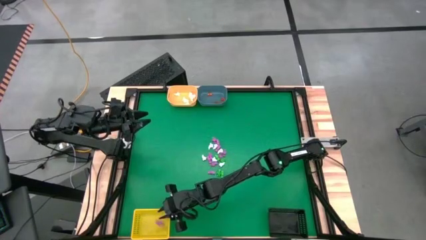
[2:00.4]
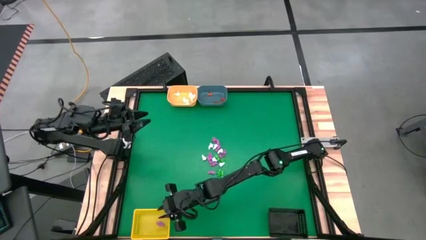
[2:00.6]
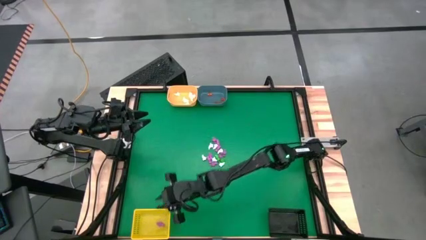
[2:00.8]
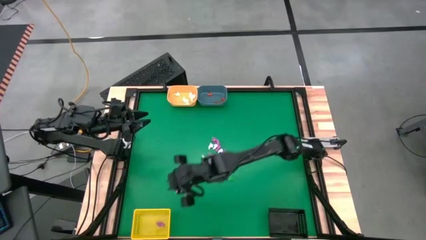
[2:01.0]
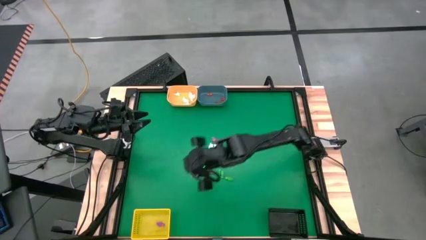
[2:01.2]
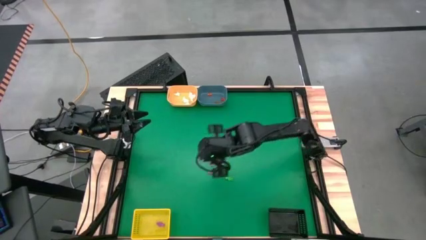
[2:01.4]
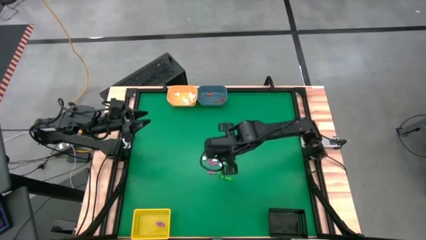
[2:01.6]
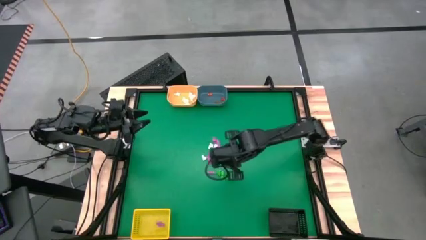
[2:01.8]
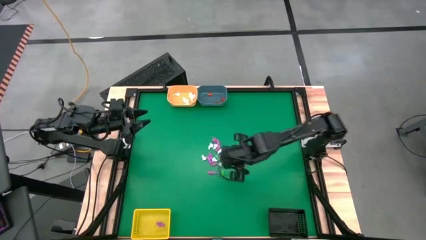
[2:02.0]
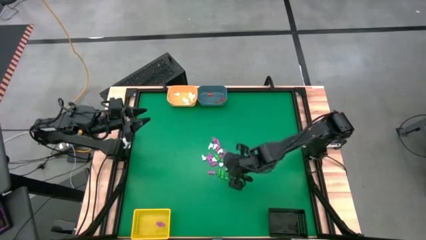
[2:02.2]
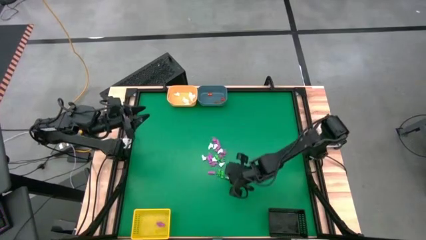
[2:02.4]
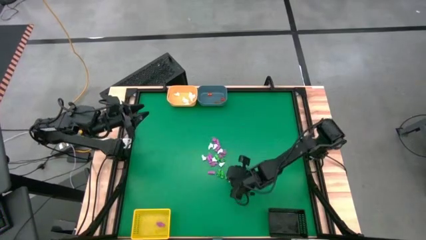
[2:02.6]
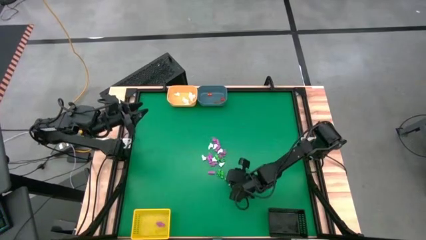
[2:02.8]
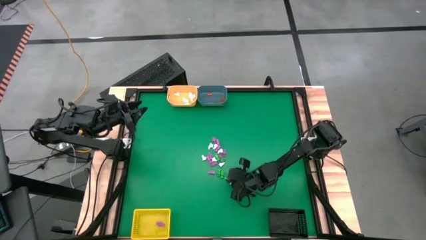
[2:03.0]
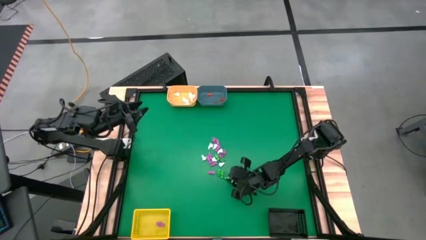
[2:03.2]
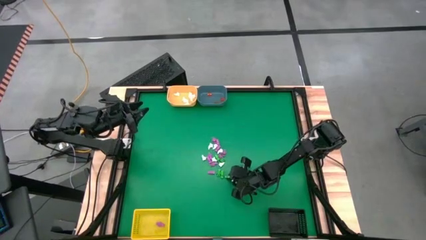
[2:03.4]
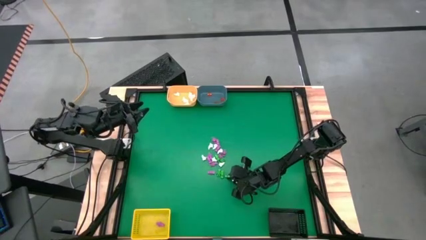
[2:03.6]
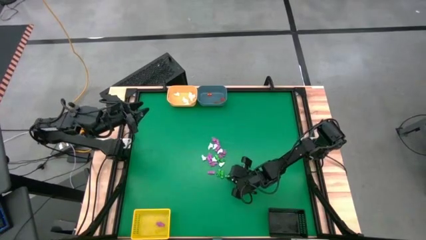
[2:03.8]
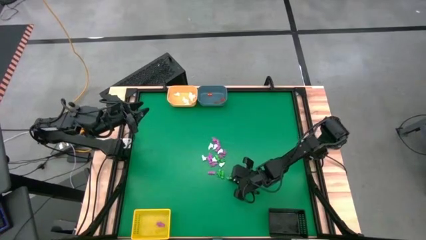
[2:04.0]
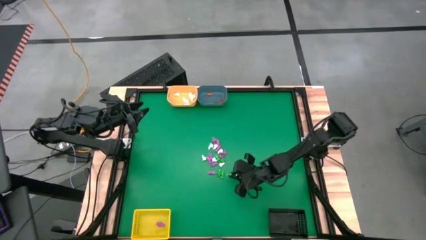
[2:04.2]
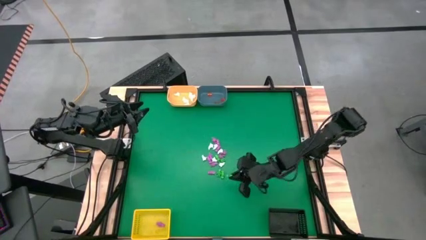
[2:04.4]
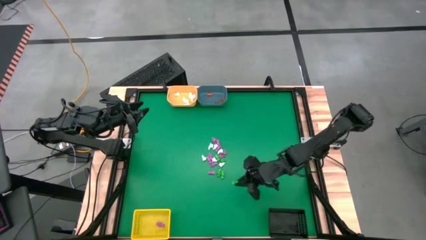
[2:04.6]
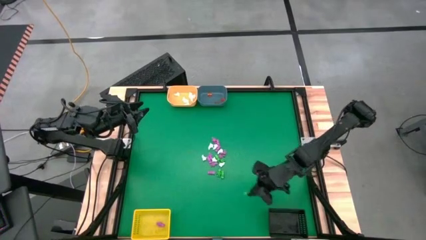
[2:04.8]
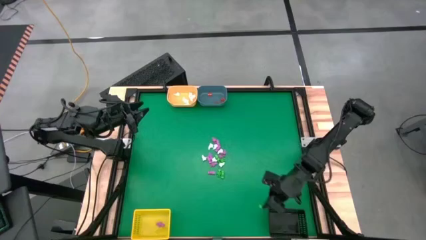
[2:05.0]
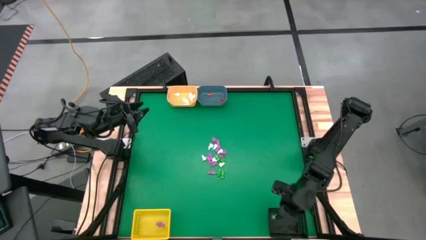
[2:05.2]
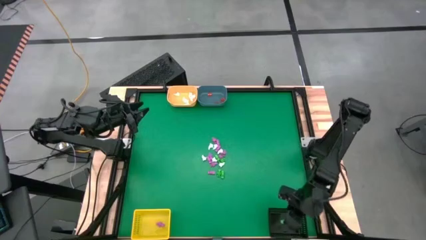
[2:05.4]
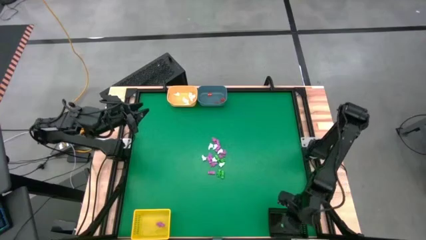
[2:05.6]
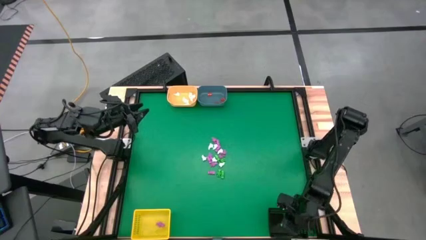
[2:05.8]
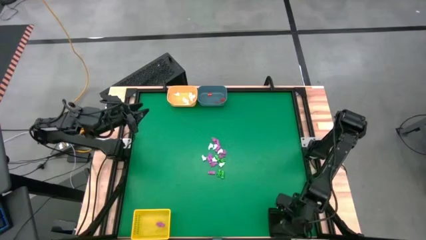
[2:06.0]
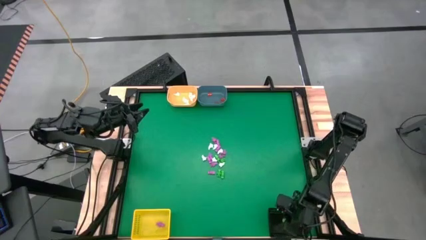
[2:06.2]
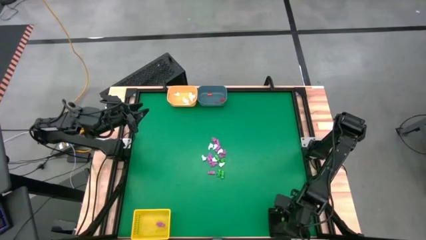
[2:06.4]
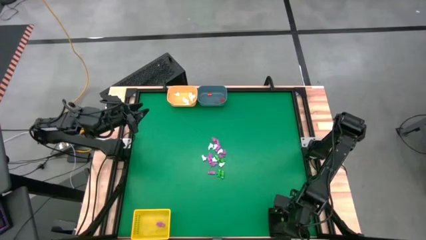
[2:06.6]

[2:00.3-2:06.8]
Task: Sort Halloween decoration
Put the green skeleton into the black bin

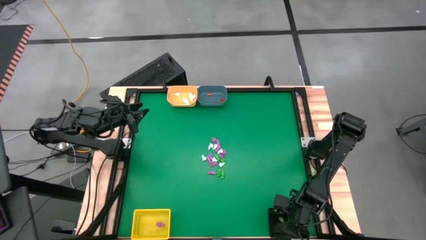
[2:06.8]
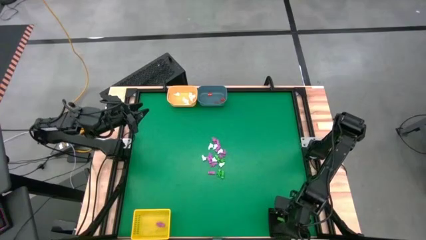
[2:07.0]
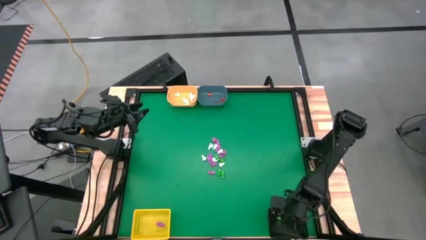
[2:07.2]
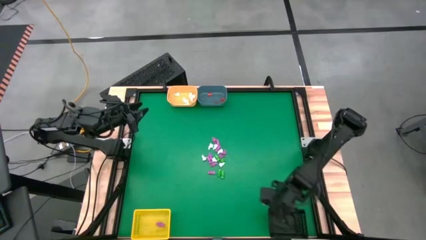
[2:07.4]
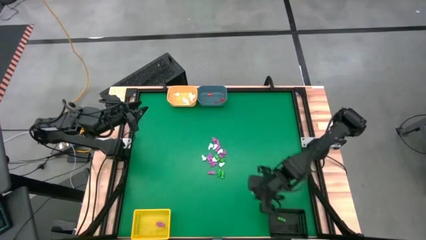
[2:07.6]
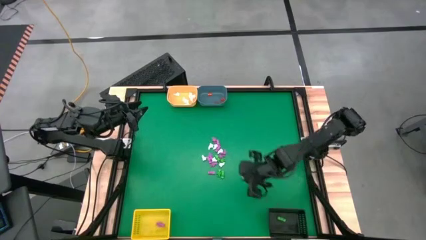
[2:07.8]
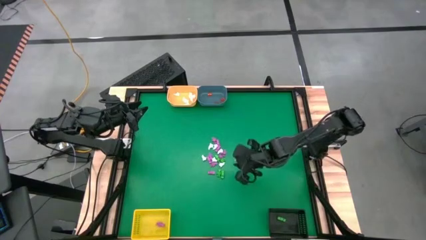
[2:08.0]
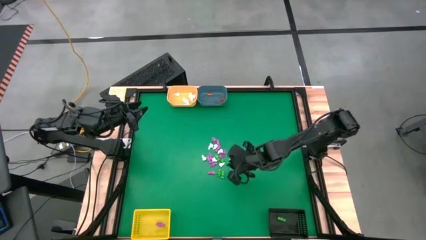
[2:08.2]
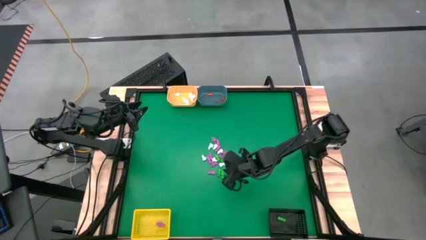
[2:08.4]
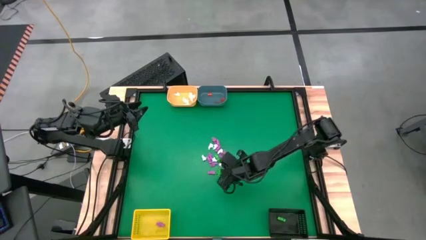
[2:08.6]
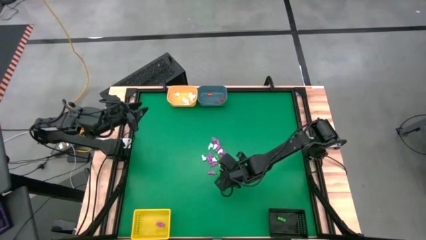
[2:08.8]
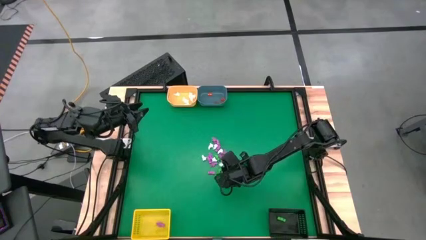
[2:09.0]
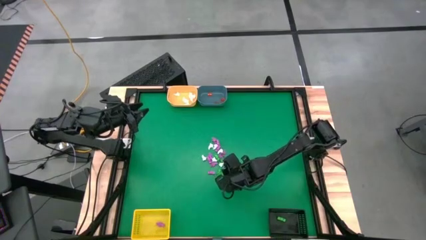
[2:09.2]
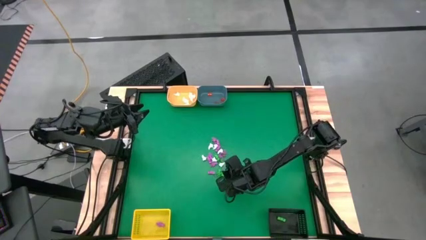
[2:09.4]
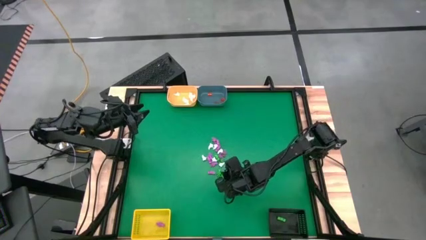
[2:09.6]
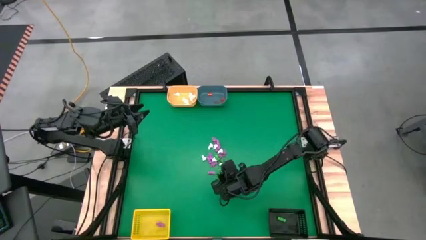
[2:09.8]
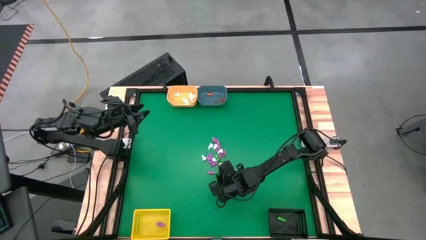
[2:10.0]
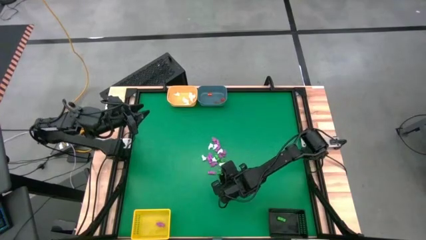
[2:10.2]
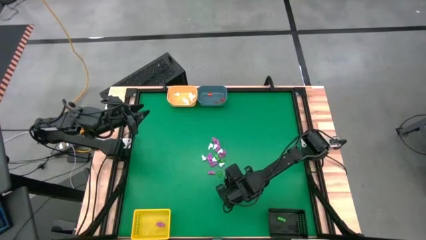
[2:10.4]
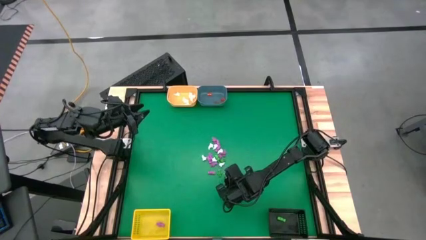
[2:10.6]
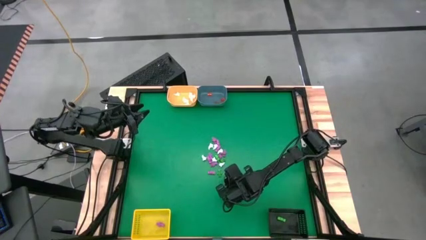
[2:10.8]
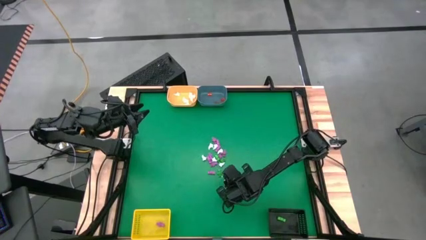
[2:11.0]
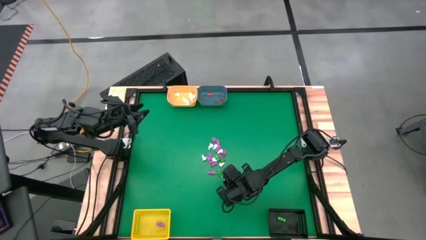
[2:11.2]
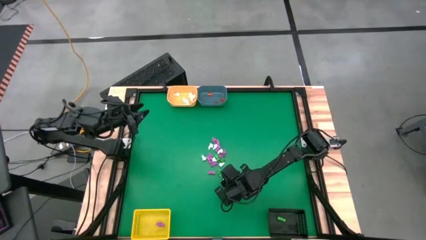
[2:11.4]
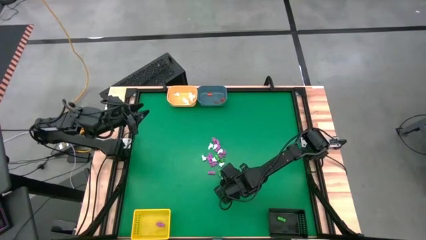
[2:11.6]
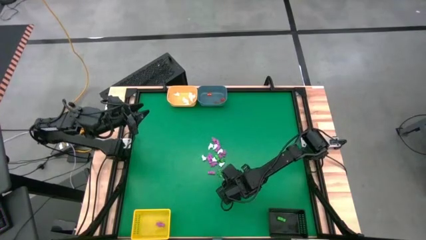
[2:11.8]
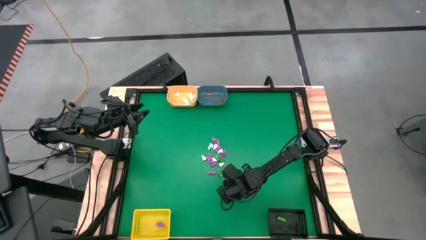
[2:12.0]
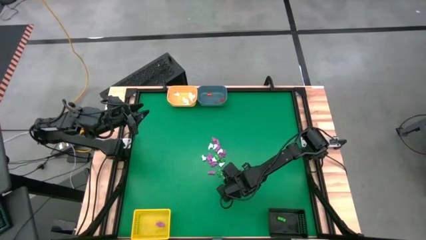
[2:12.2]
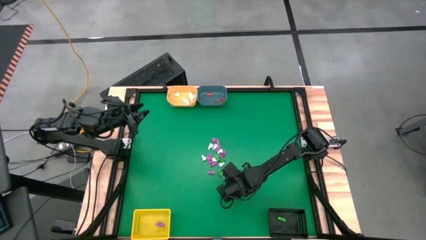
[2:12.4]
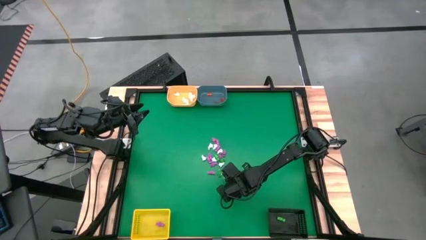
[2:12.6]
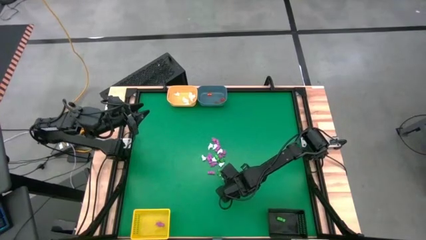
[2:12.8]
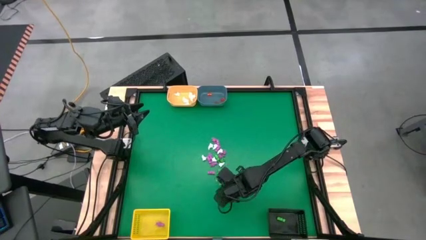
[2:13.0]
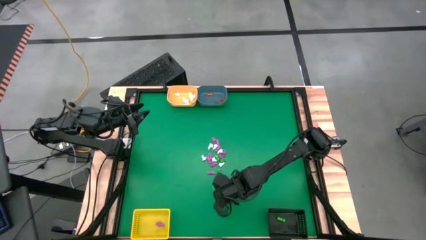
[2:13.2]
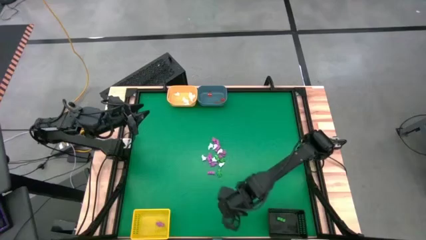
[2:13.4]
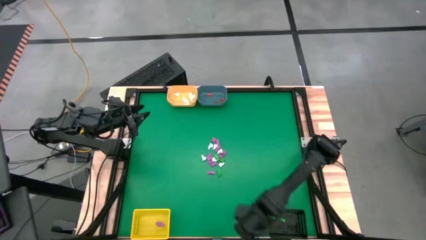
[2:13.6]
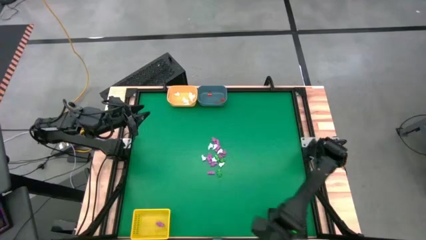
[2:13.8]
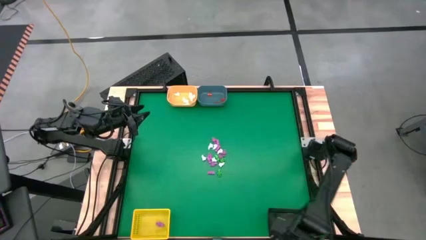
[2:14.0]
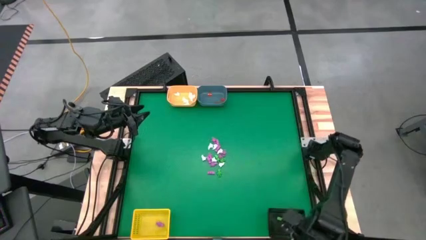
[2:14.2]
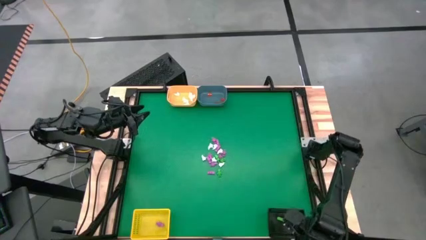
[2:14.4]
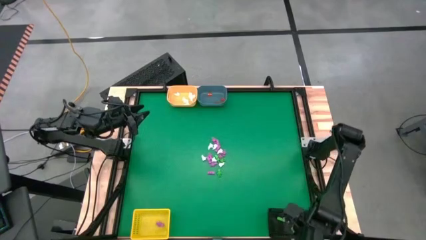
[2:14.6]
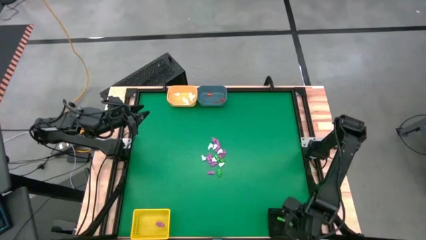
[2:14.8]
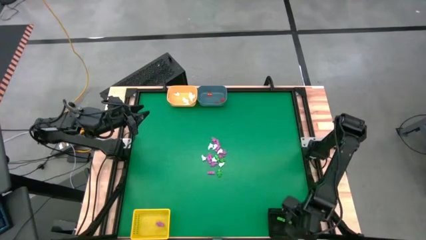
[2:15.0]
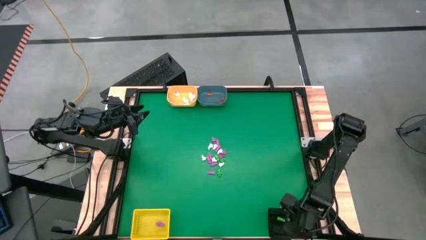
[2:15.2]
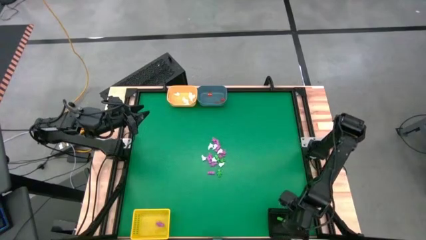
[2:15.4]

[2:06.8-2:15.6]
Put the green skeleton into the black bin
